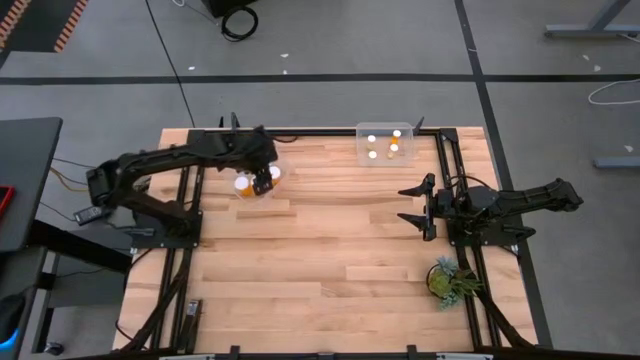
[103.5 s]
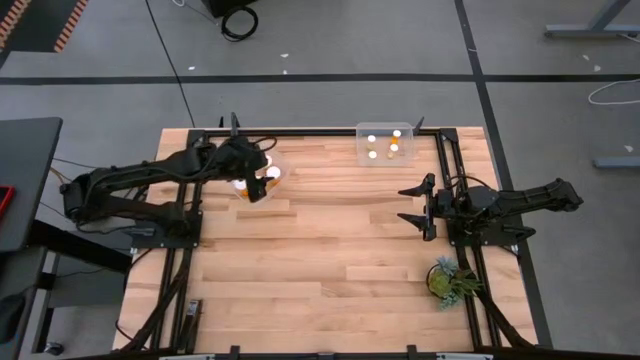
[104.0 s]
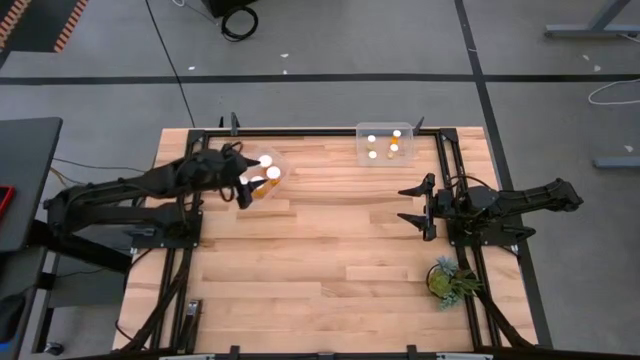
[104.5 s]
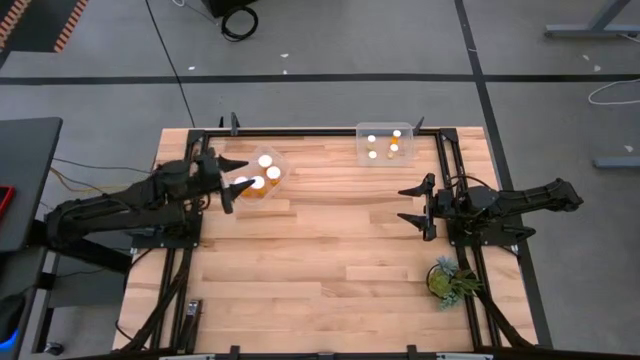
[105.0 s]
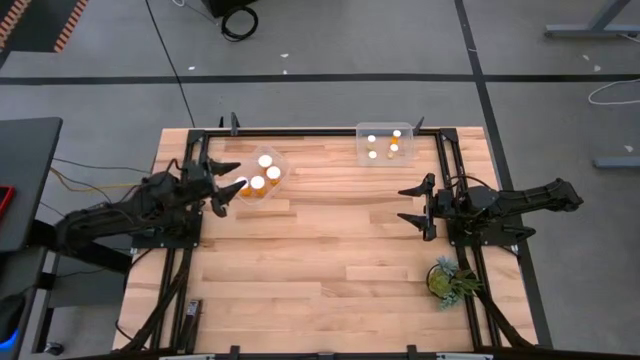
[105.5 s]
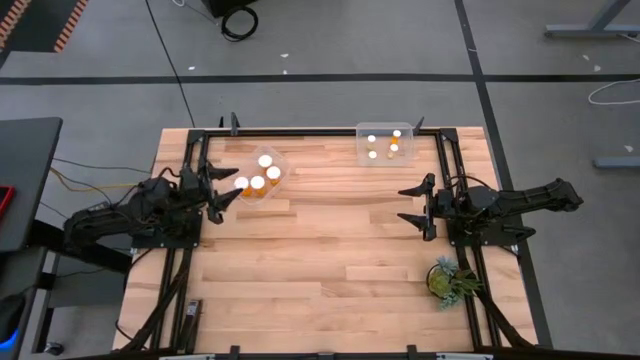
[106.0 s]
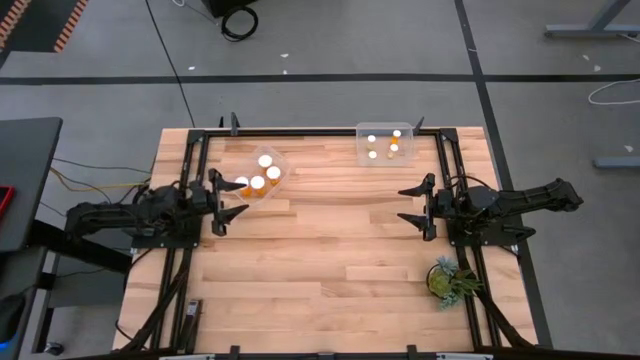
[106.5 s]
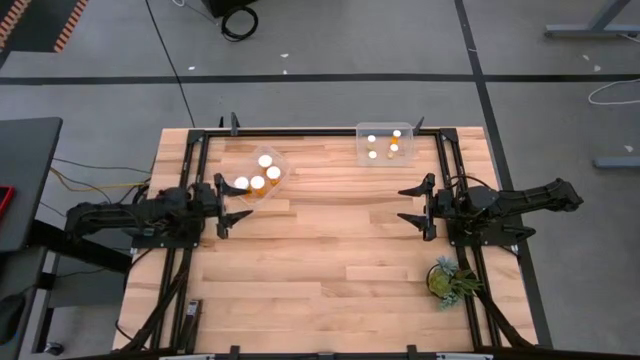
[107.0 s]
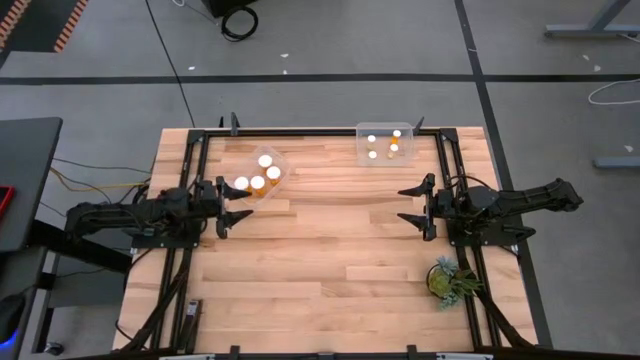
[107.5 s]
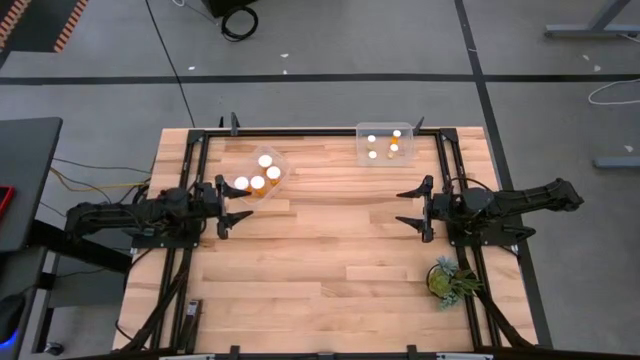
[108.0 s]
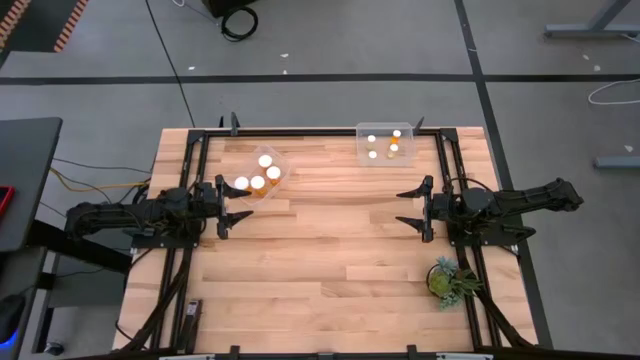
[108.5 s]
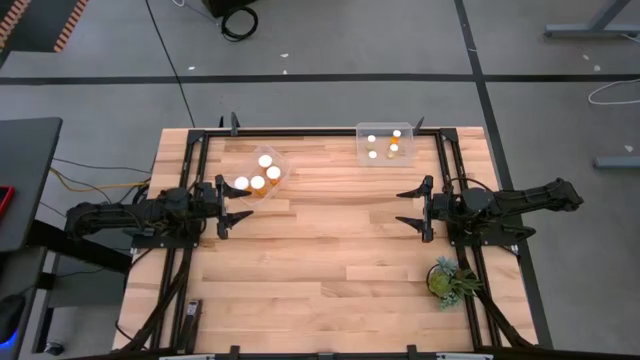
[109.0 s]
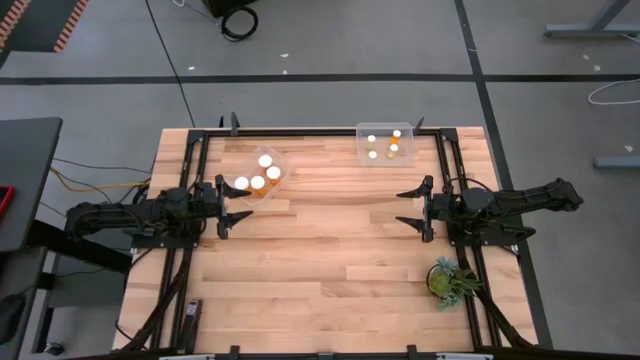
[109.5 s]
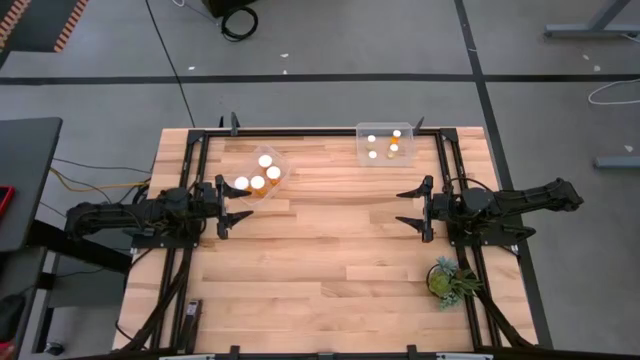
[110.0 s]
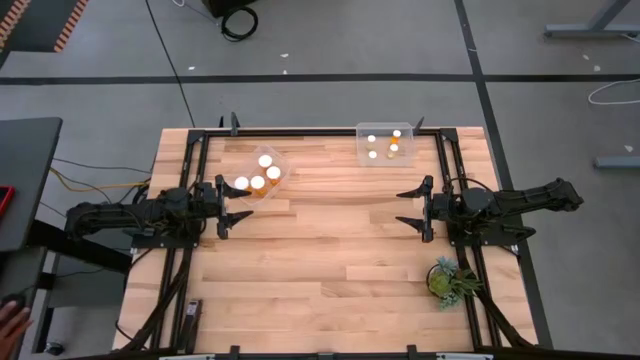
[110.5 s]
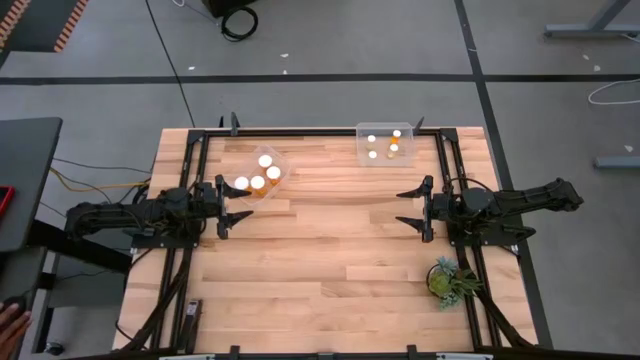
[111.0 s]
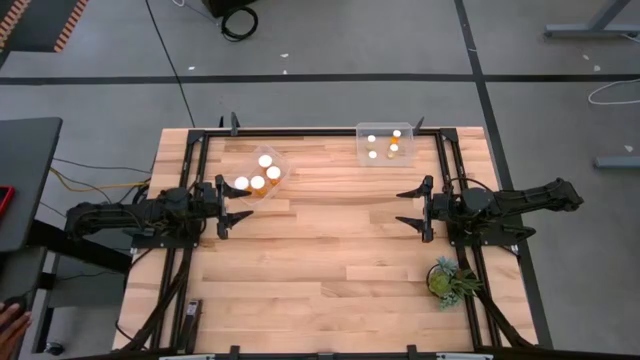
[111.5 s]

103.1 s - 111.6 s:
Task: Pick and place medicine bottles into bin by pill shape (circle, oval)
Return to Home Position

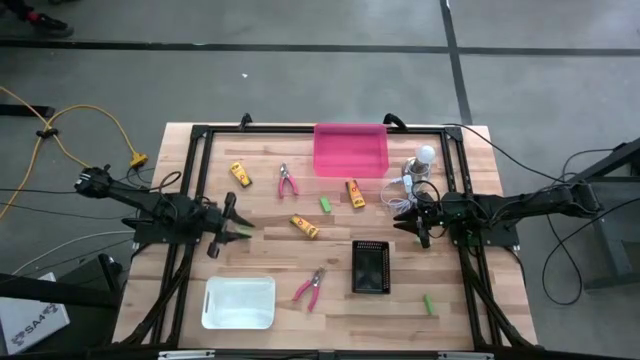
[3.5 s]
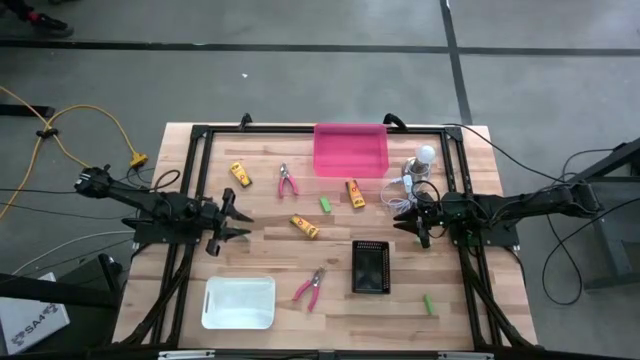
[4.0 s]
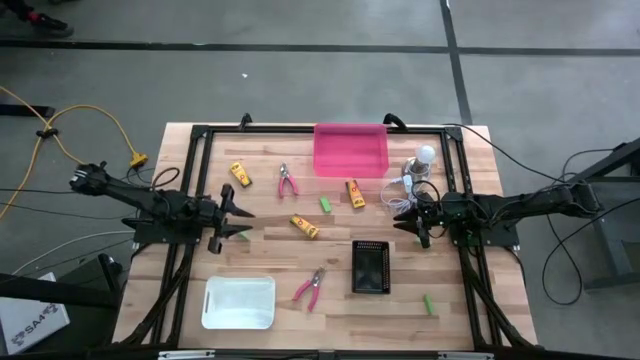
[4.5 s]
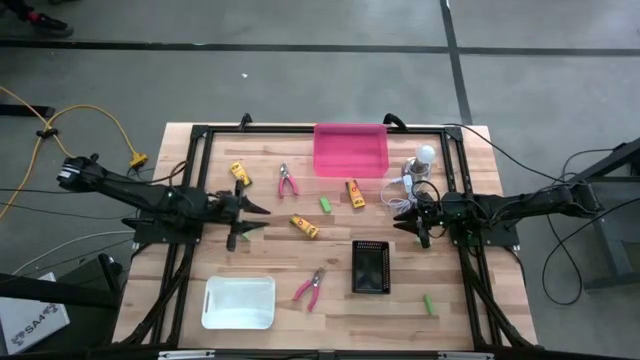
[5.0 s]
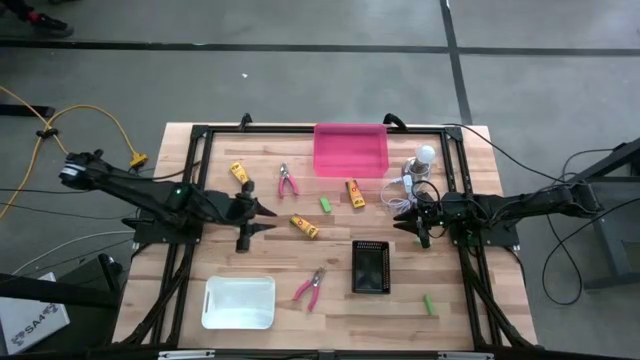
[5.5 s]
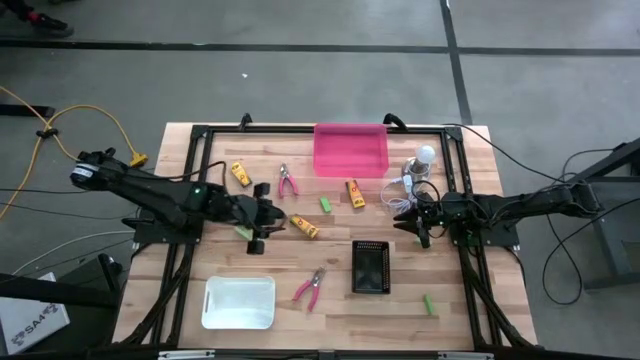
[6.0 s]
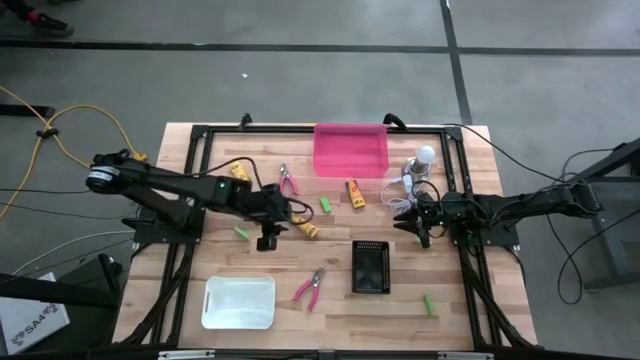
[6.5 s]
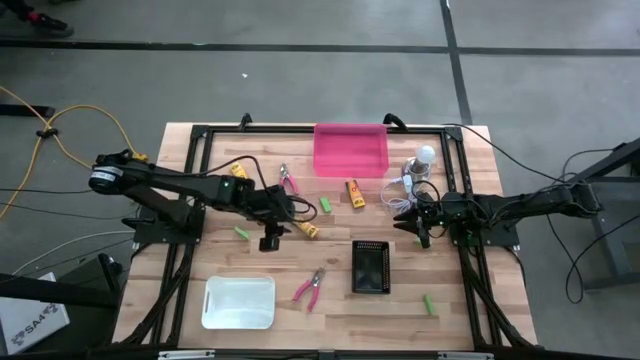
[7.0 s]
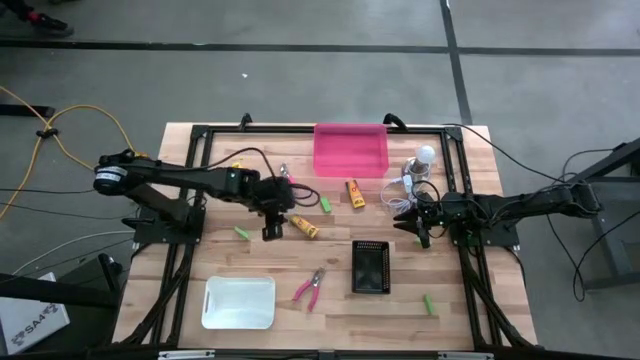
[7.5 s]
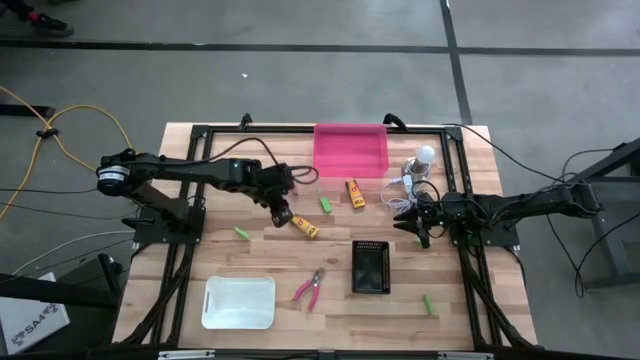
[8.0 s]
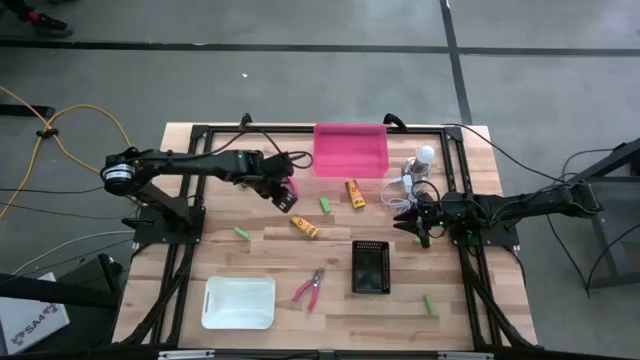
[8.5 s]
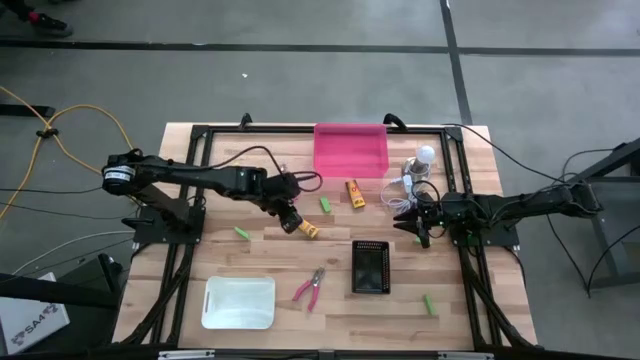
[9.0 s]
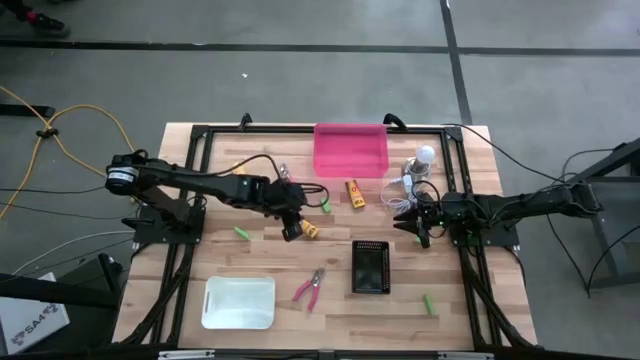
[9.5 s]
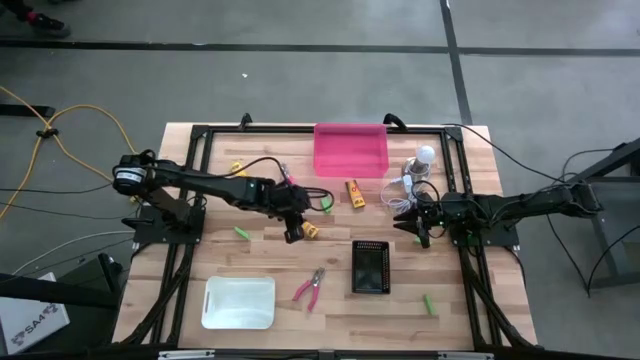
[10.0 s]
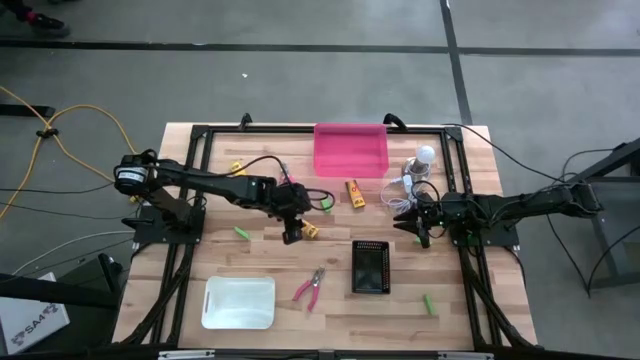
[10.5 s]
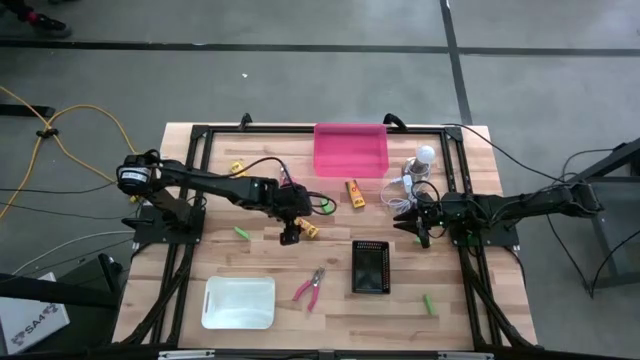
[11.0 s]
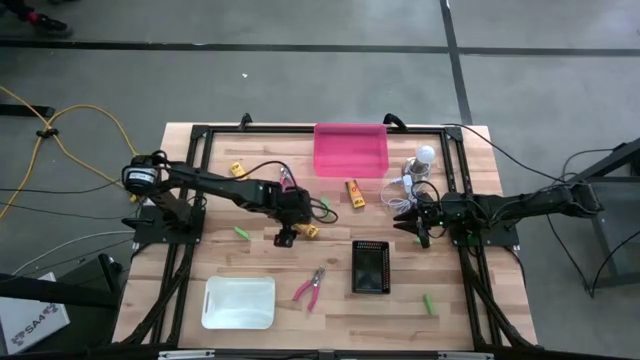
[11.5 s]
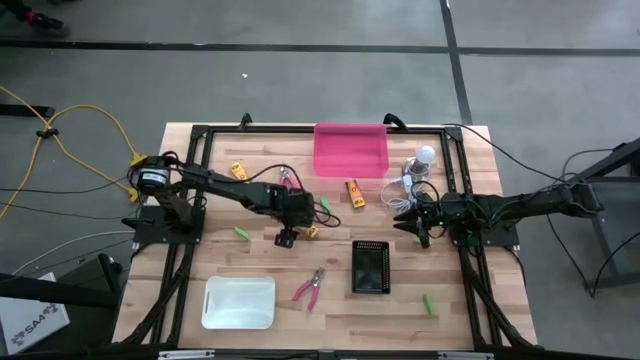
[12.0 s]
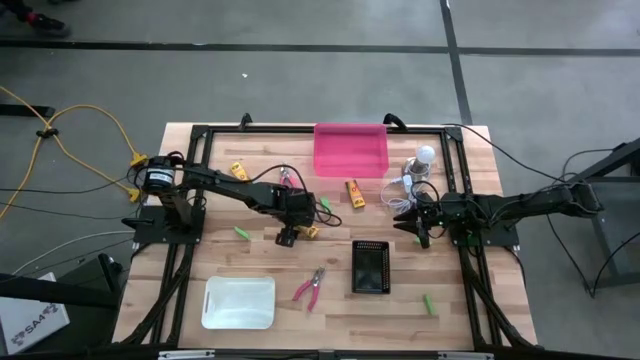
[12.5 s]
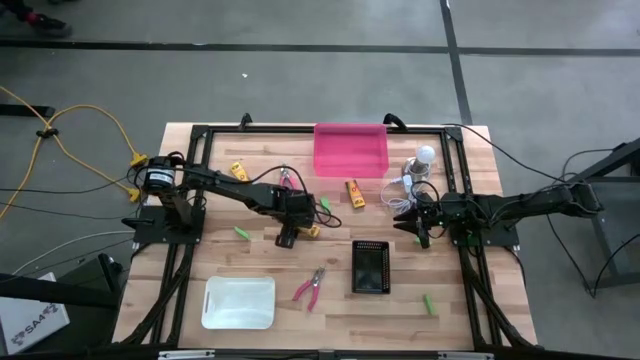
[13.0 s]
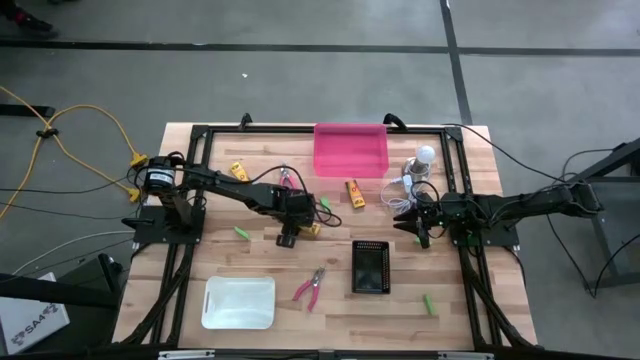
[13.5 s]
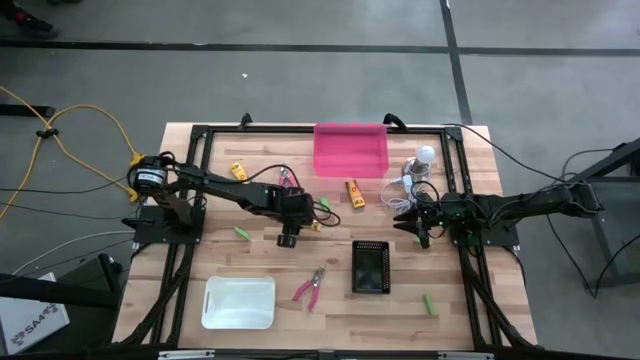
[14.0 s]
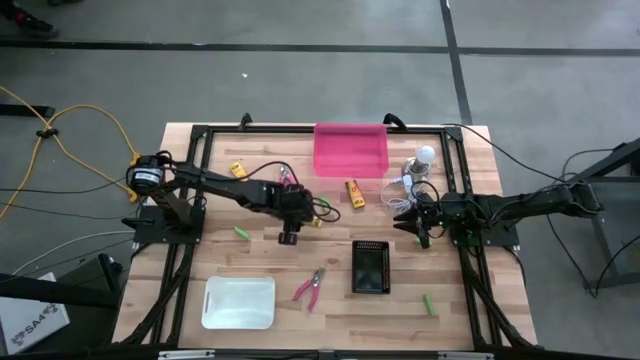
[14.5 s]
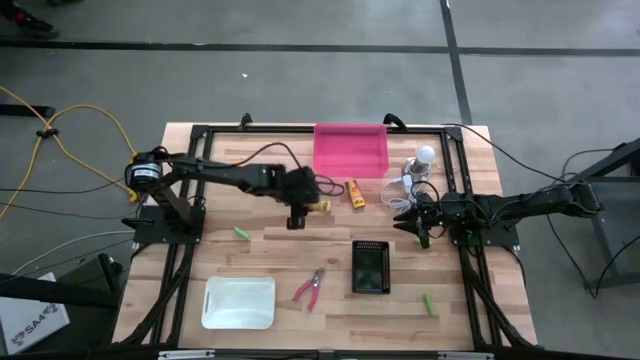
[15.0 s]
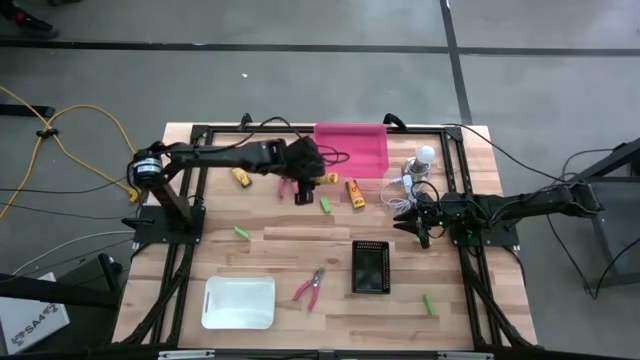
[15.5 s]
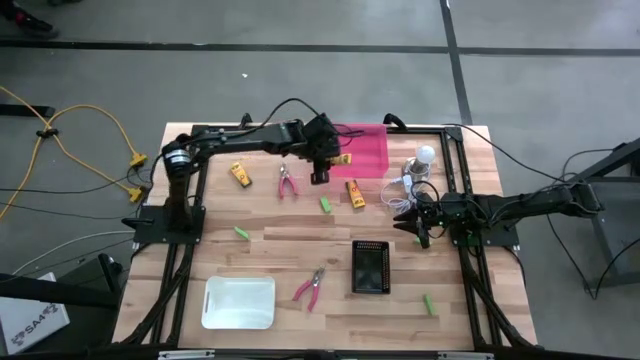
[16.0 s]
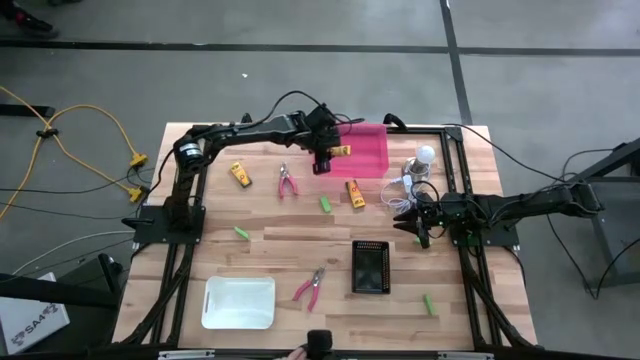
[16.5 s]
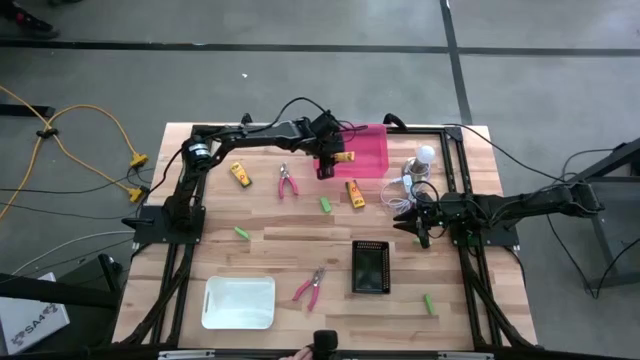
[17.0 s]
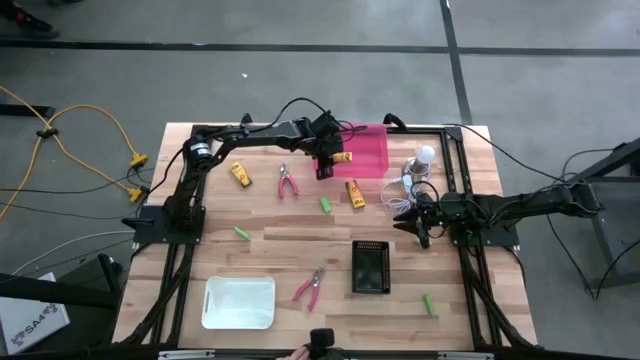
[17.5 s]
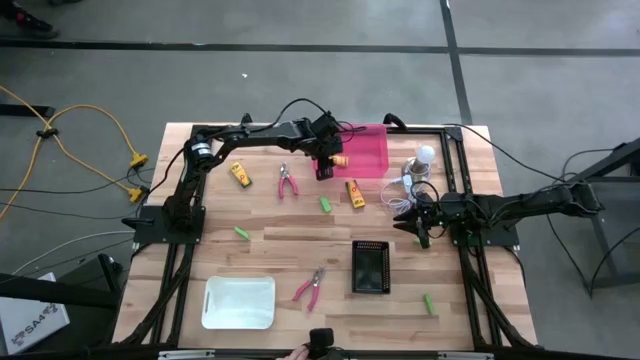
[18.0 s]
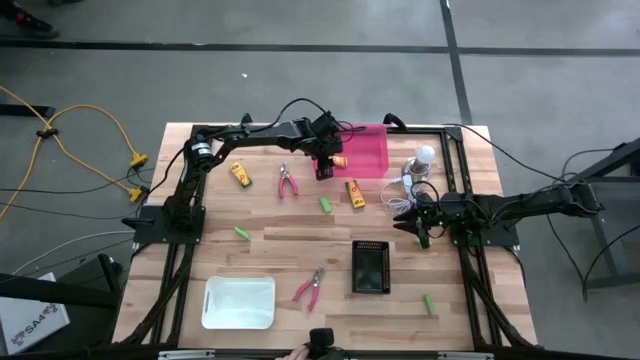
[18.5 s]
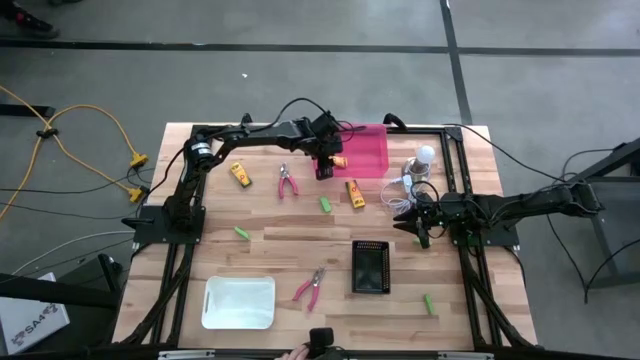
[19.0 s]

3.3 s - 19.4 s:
Task: Pick & Place School Supplies
Put the yellow crayon box into the pink bin
